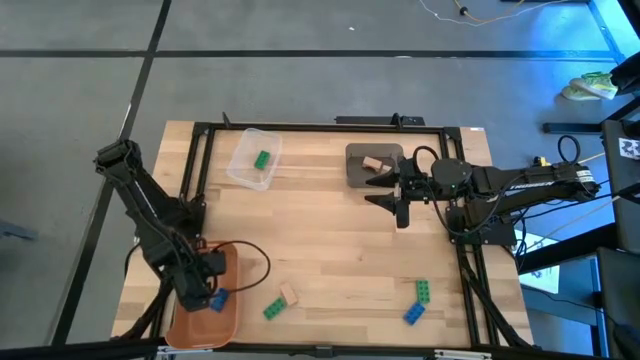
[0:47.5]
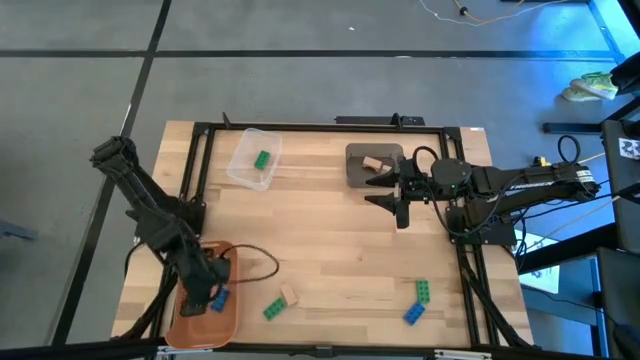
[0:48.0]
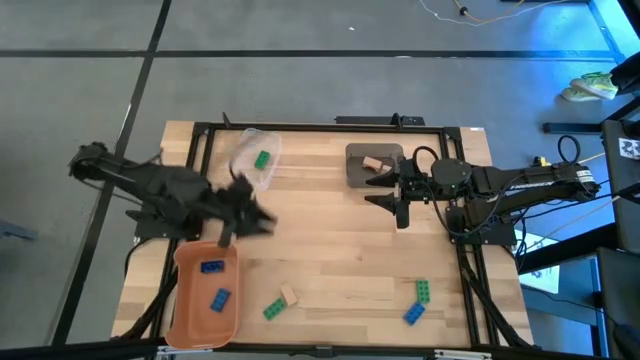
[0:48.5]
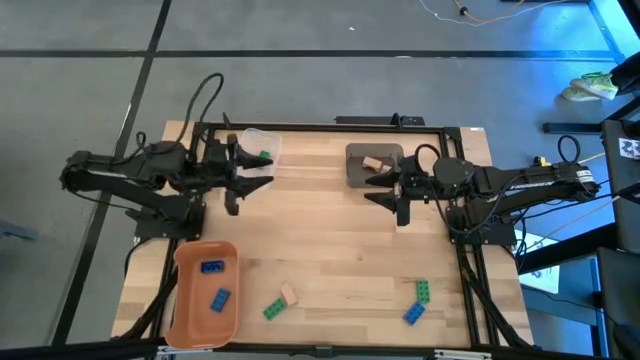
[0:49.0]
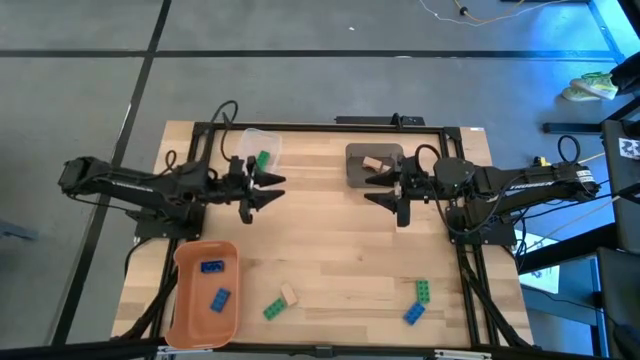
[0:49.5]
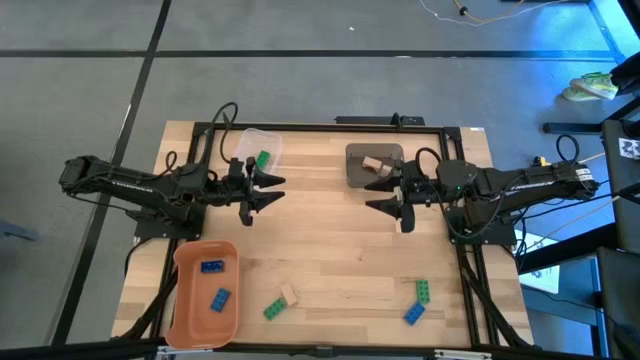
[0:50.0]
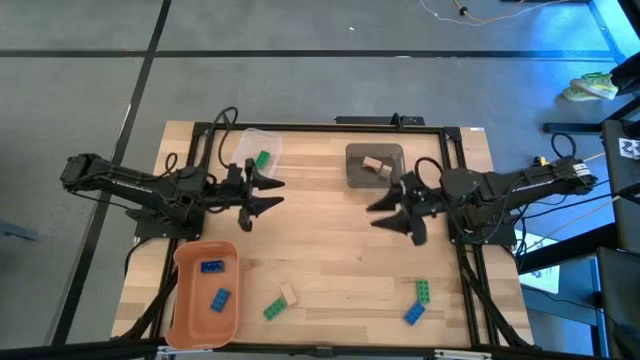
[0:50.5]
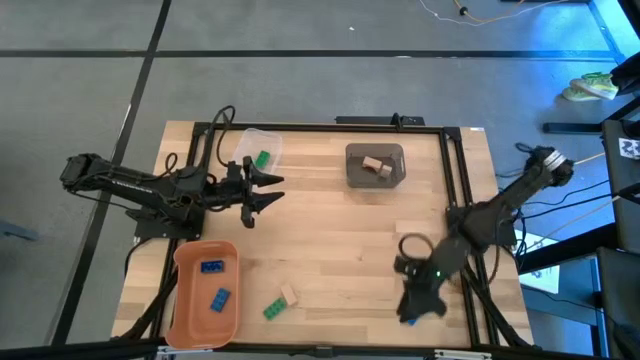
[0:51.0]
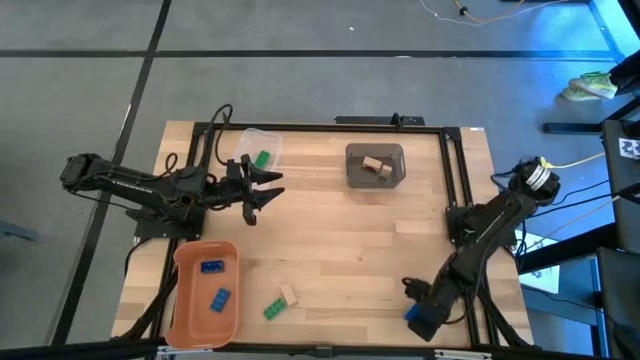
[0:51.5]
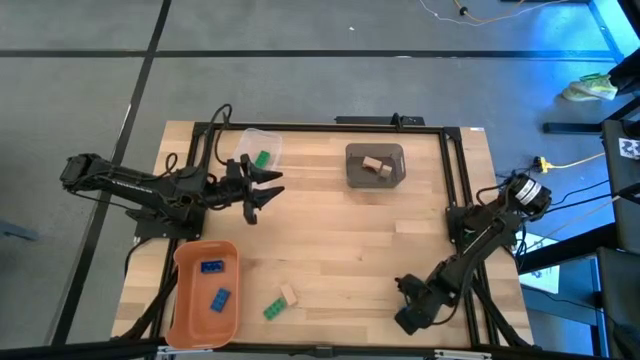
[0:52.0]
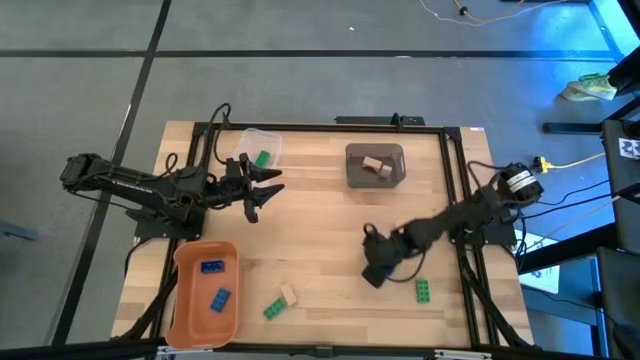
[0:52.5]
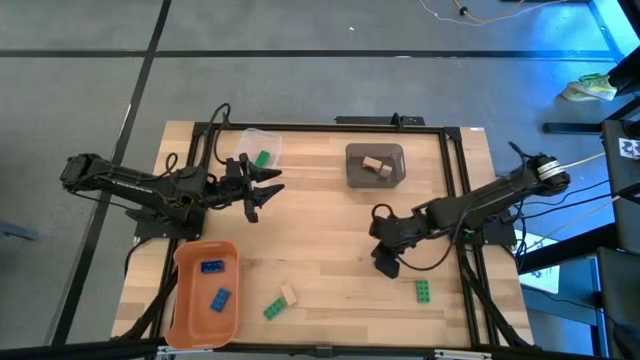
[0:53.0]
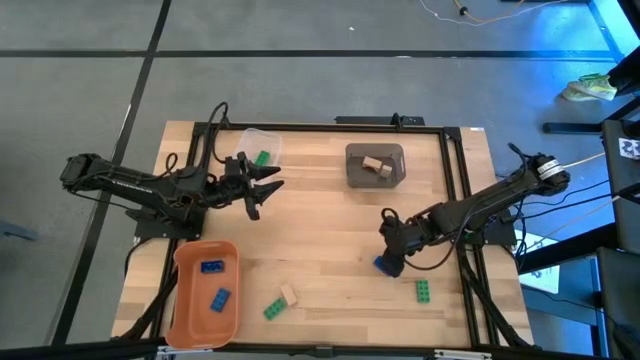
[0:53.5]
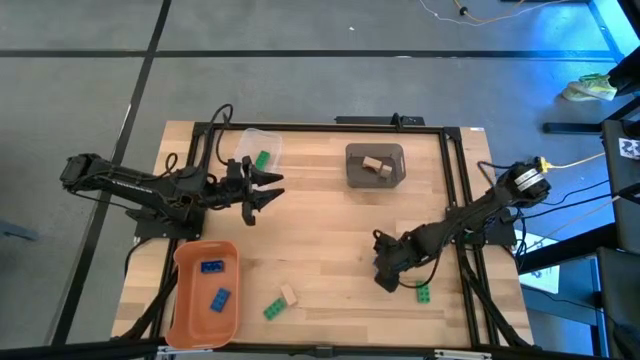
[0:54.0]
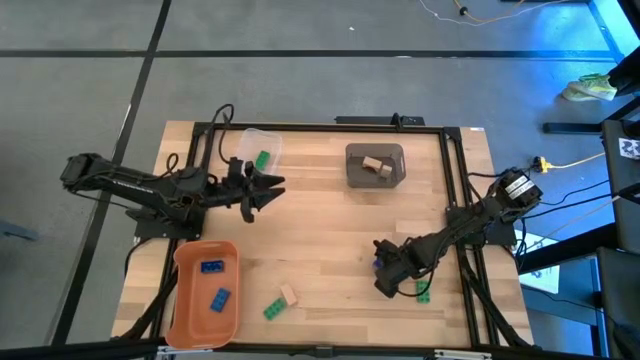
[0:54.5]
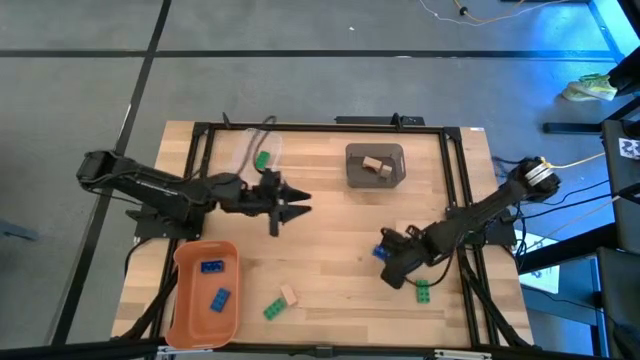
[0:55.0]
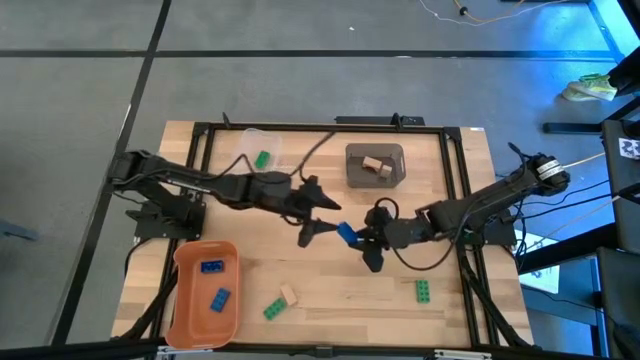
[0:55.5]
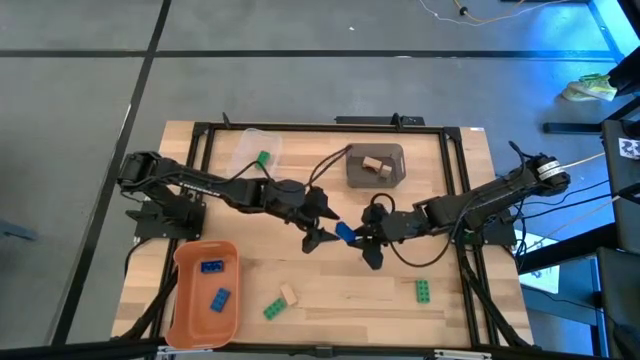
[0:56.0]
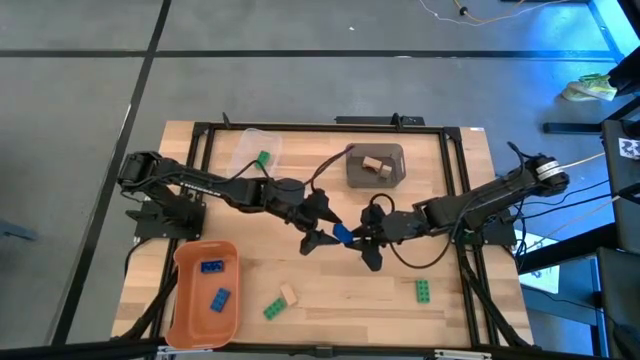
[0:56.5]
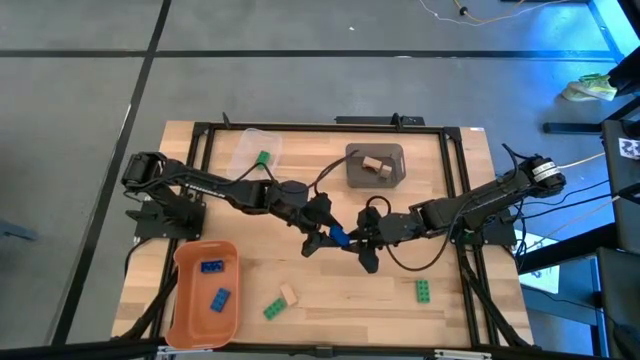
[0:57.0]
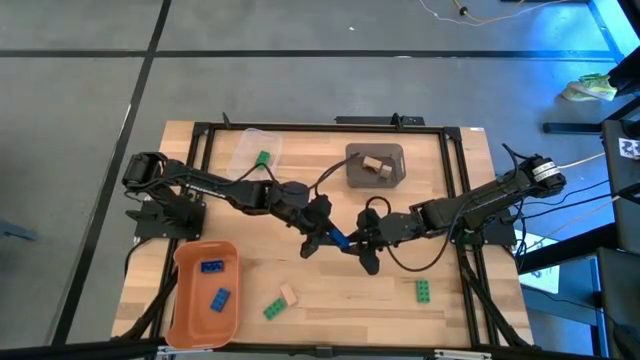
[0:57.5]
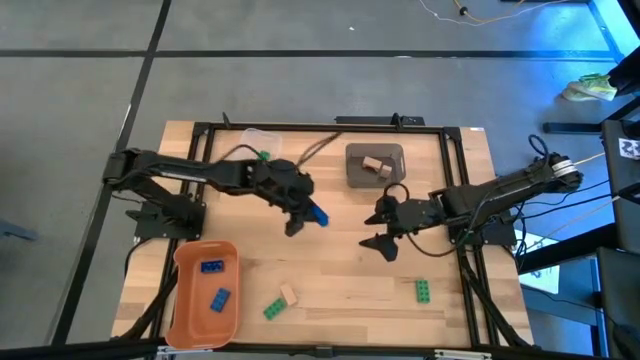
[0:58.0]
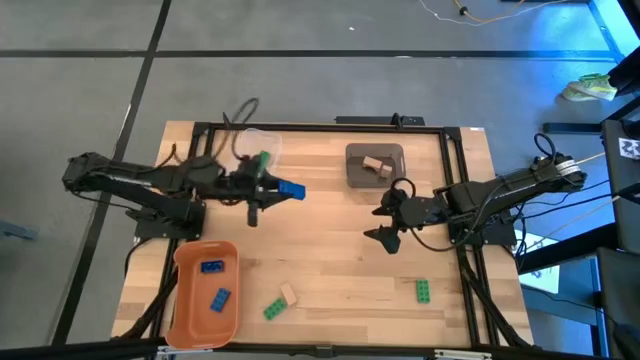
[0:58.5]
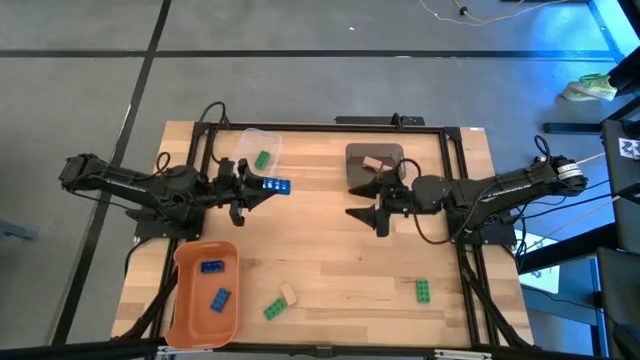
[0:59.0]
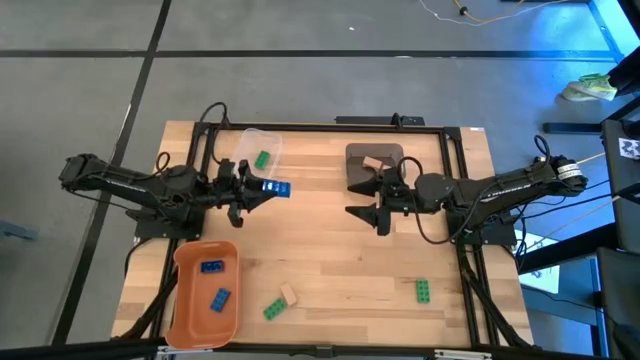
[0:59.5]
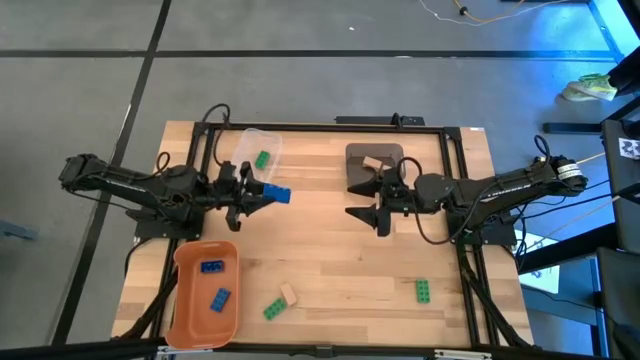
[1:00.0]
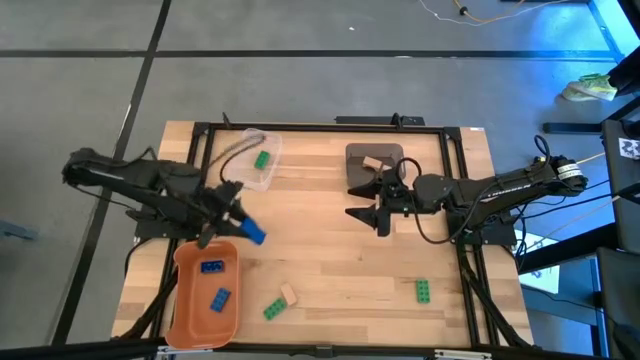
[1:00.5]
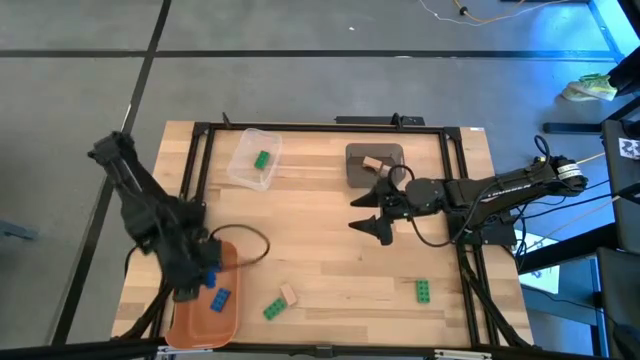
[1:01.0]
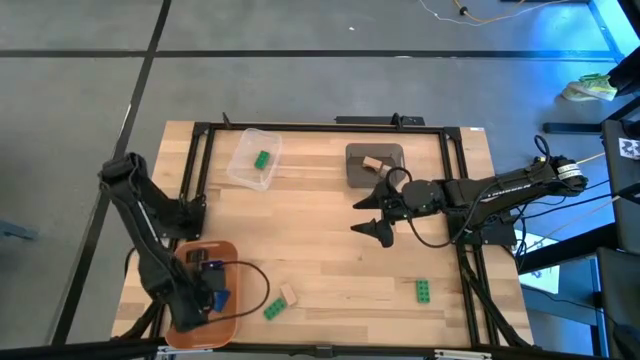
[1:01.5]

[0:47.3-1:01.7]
Task: Sort & place blocks by color
Put the blue game piece into the orange bin

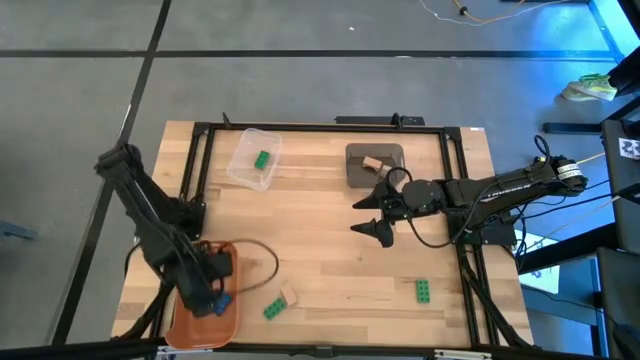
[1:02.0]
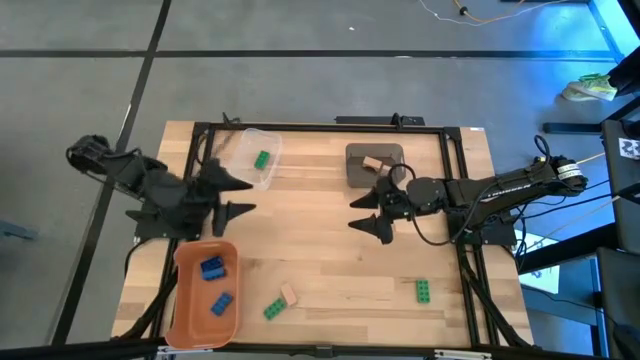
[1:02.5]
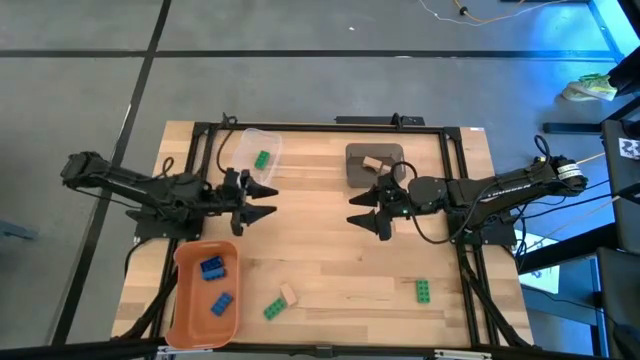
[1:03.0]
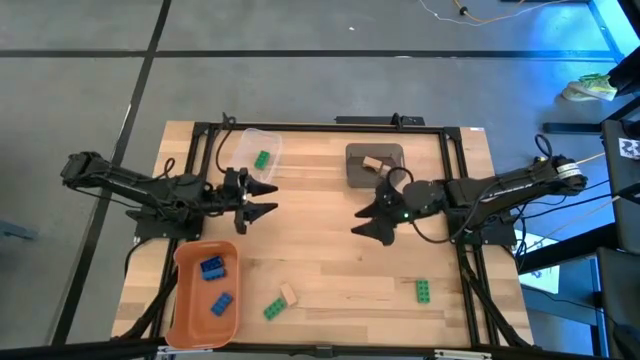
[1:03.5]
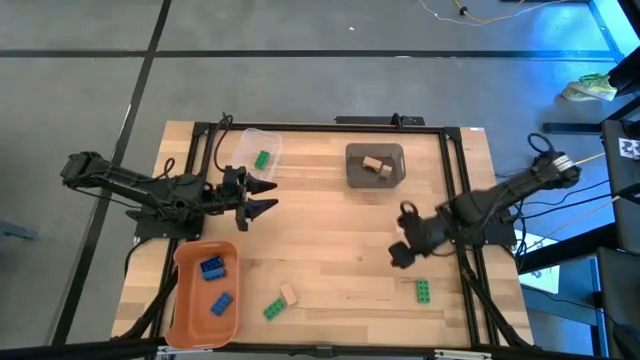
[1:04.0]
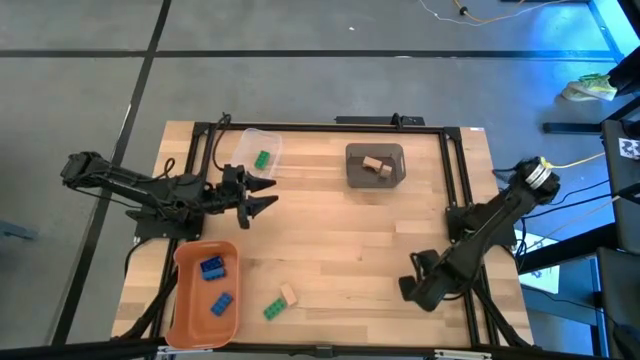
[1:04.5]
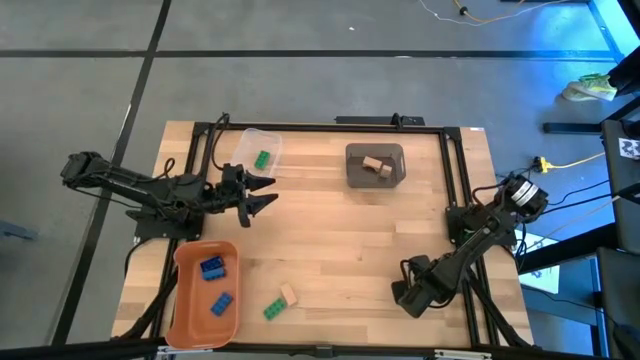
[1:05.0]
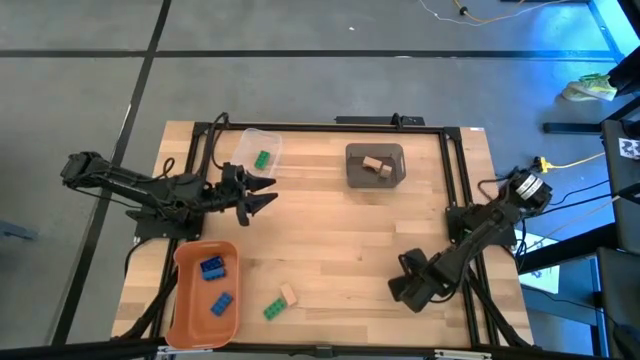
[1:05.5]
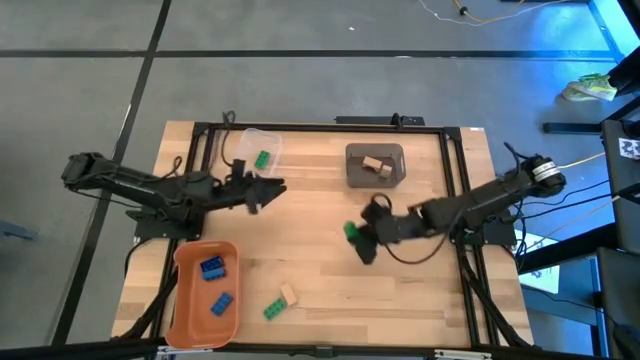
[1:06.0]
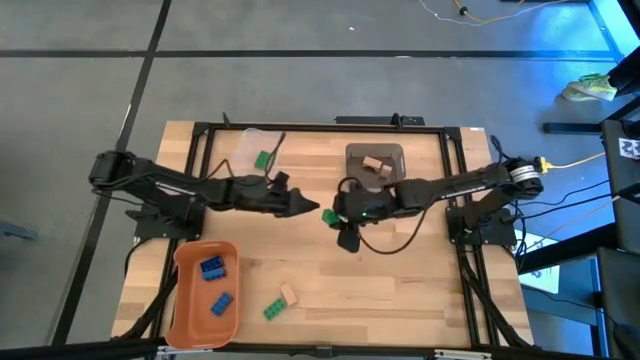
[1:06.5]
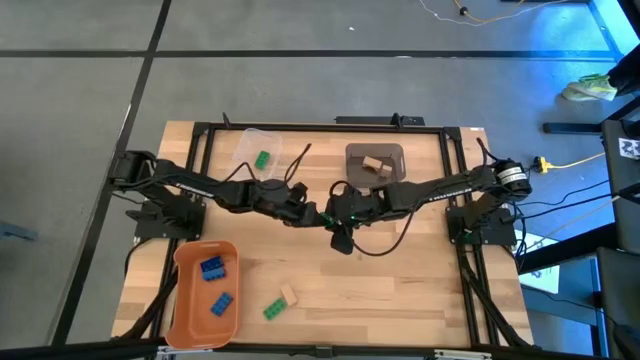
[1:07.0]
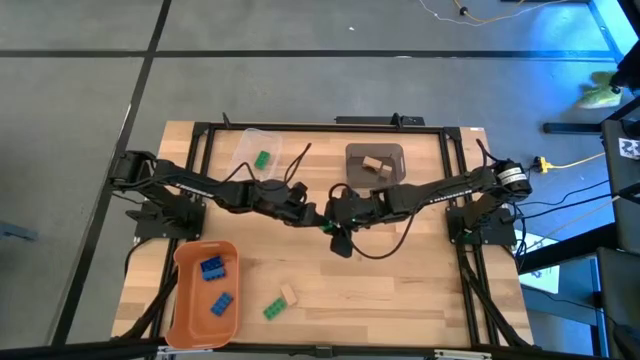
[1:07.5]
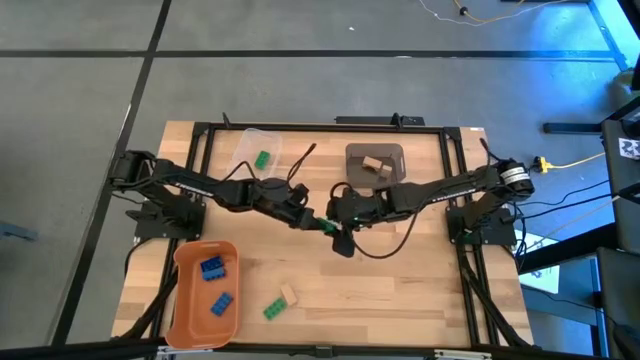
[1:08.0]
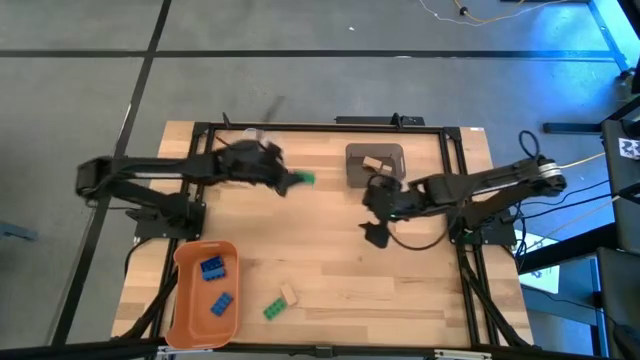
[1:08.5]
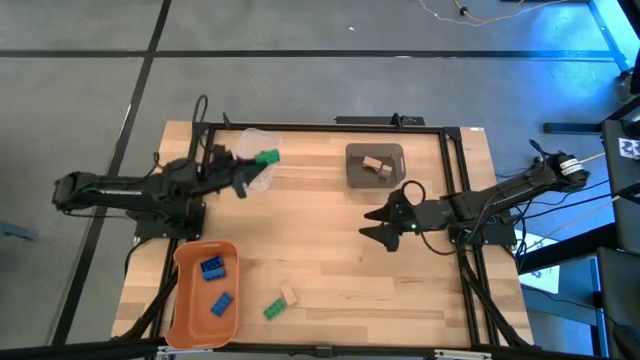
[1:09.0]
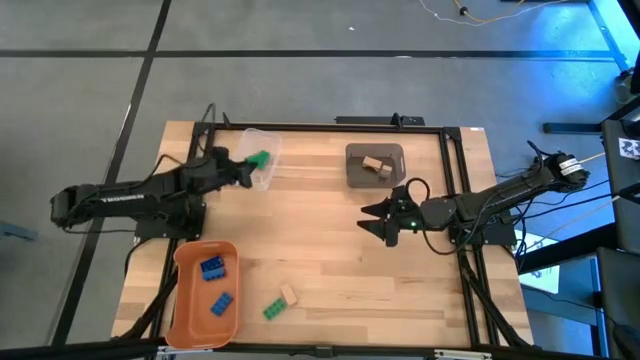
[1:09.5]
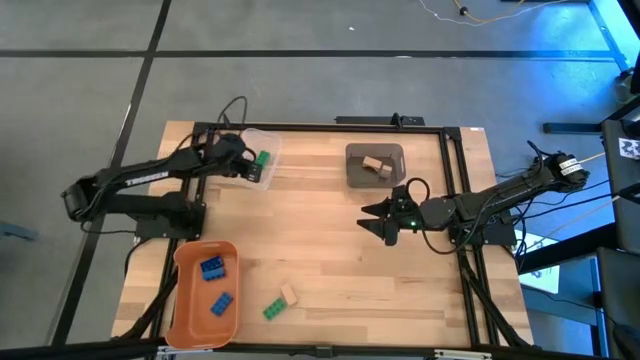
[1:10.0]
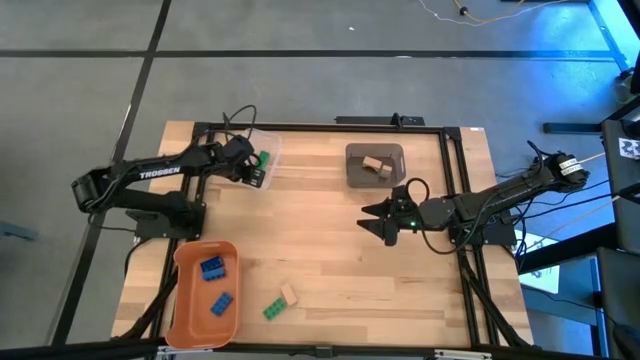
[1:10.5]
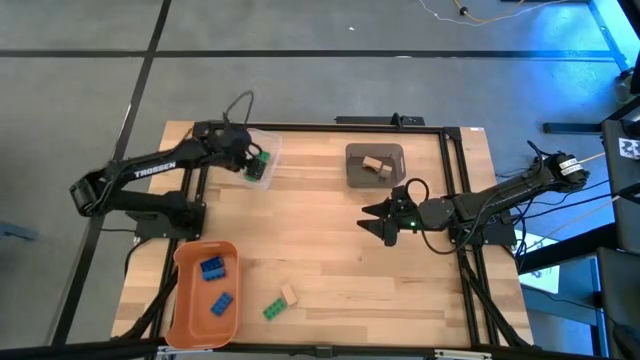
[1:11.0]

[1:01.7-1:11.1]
Put the right green game piece into the transparent bin
